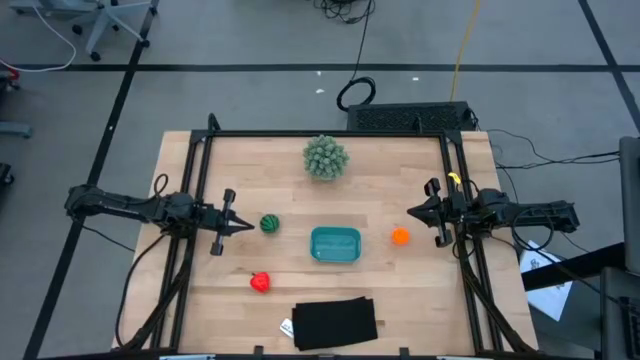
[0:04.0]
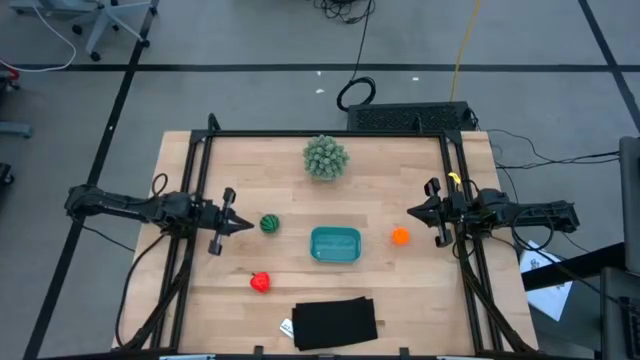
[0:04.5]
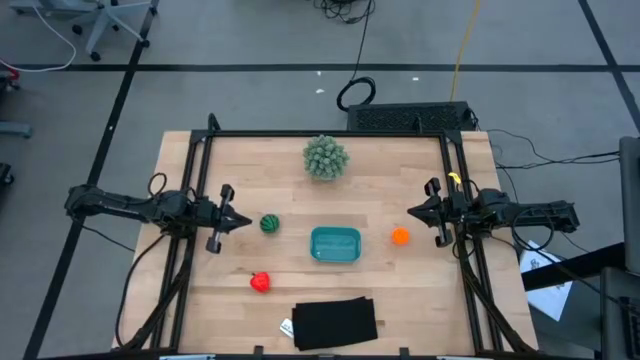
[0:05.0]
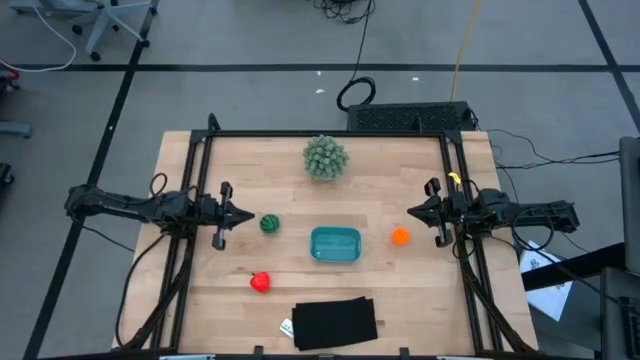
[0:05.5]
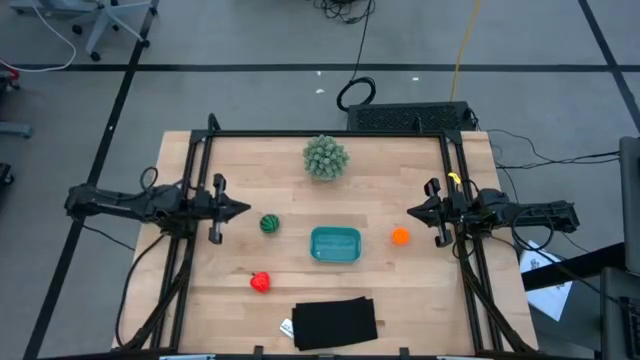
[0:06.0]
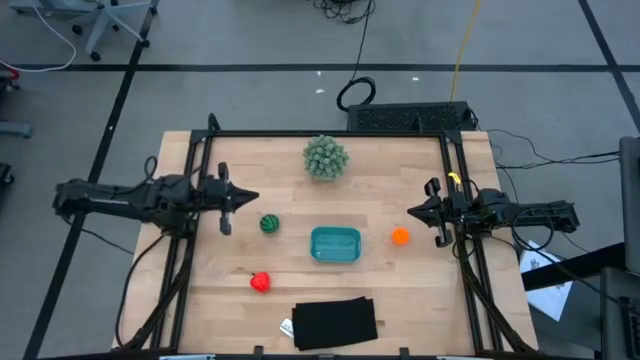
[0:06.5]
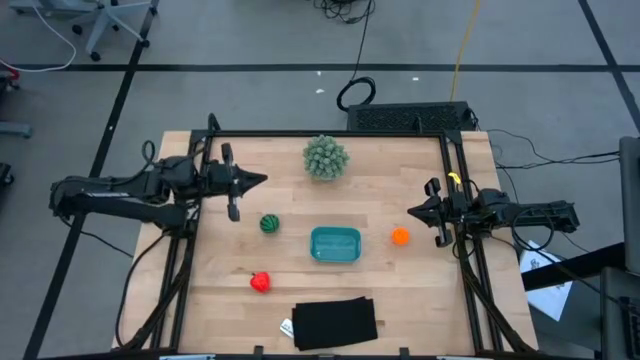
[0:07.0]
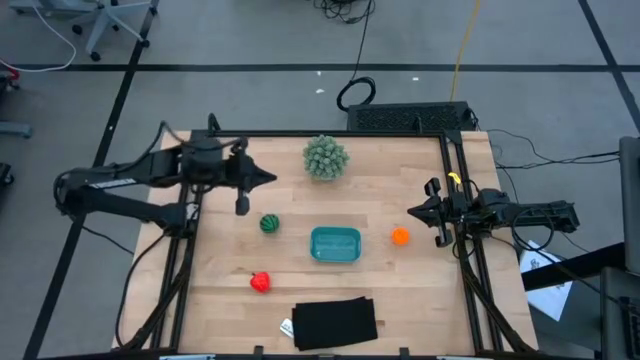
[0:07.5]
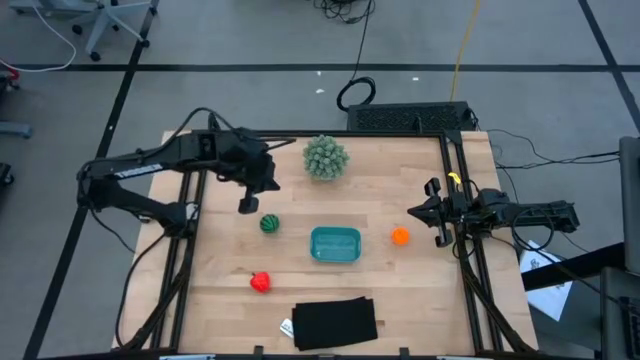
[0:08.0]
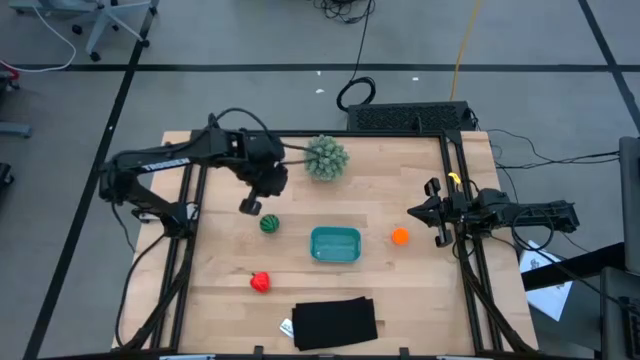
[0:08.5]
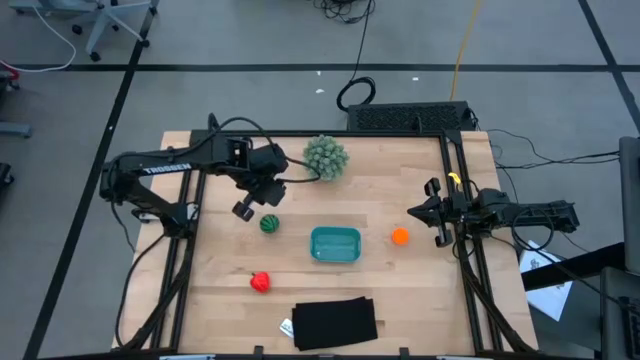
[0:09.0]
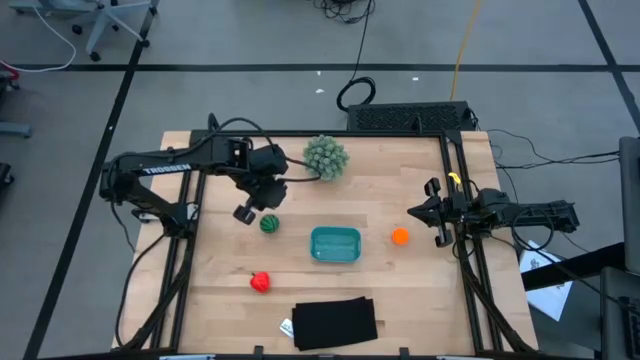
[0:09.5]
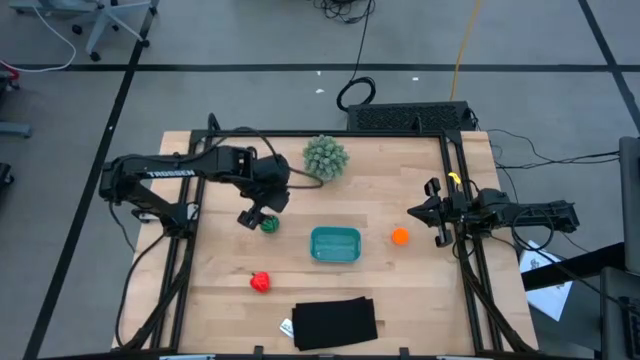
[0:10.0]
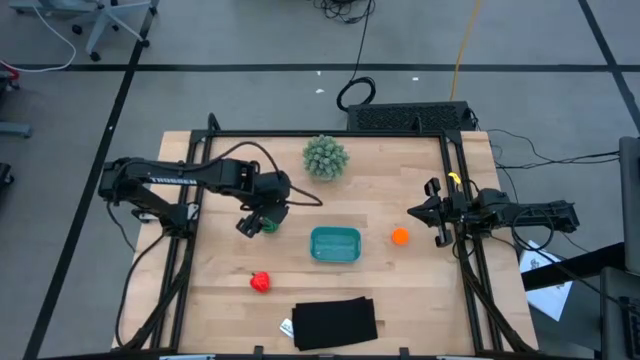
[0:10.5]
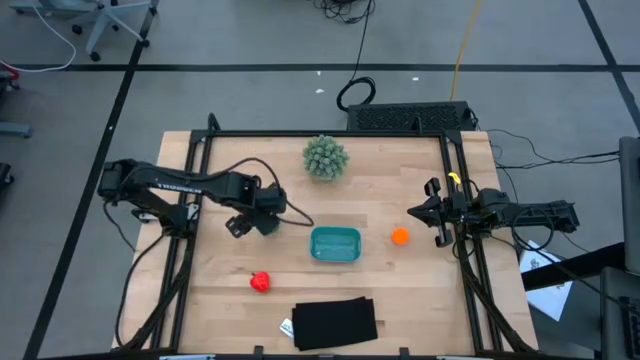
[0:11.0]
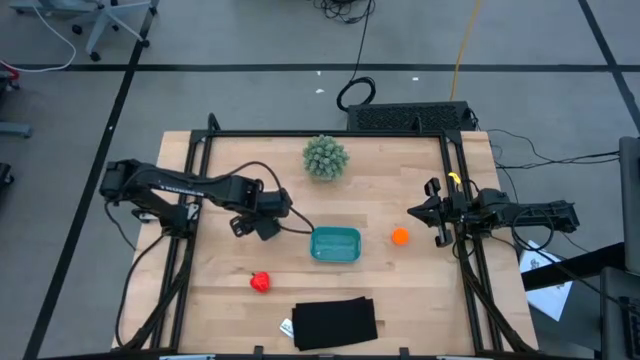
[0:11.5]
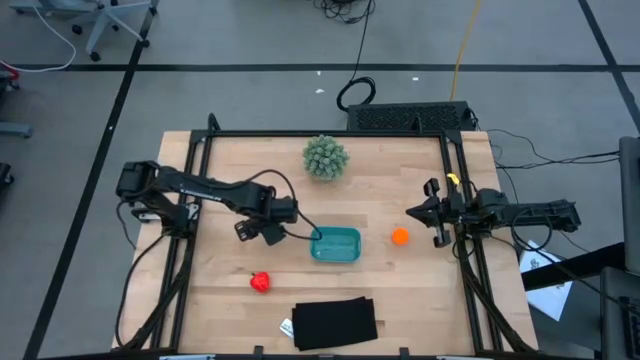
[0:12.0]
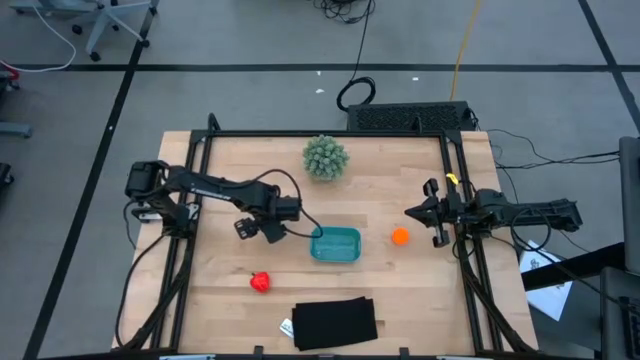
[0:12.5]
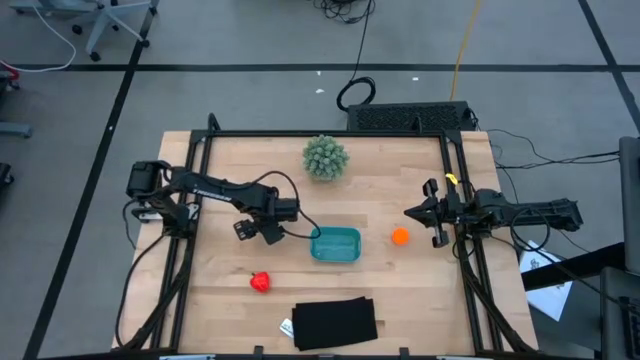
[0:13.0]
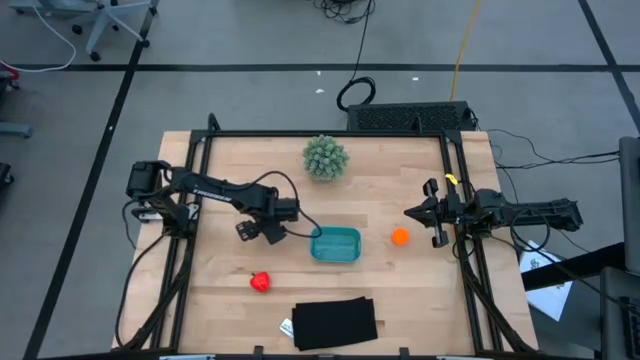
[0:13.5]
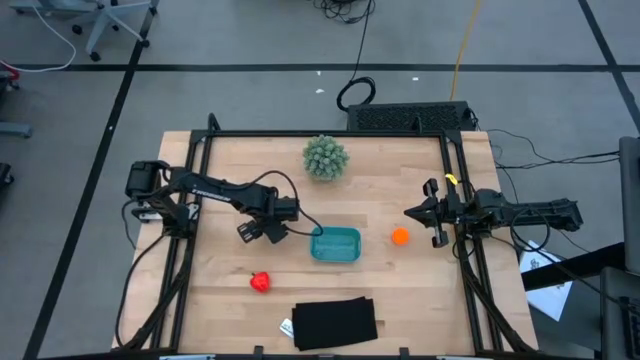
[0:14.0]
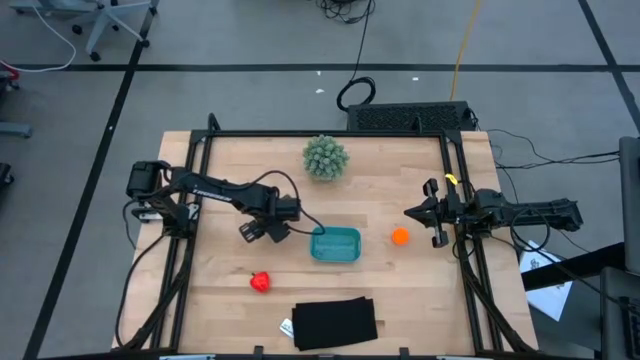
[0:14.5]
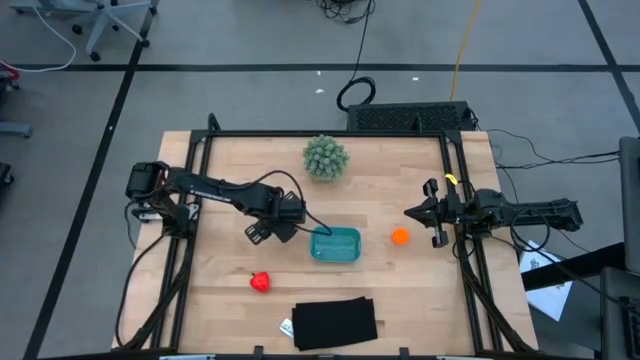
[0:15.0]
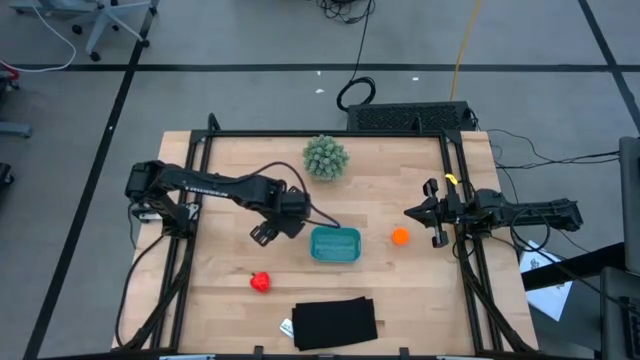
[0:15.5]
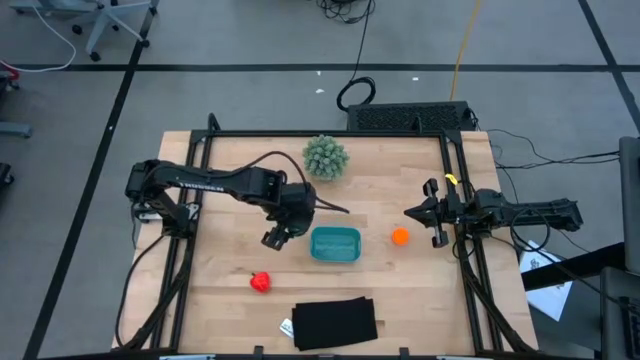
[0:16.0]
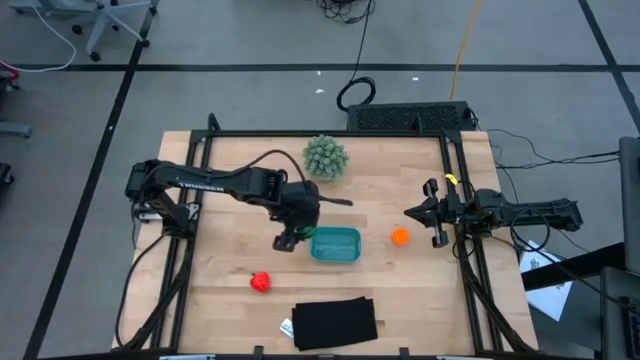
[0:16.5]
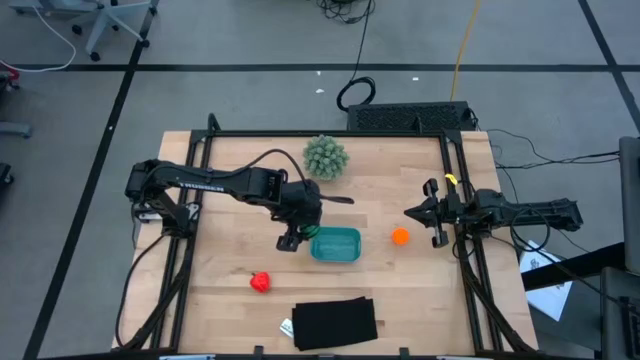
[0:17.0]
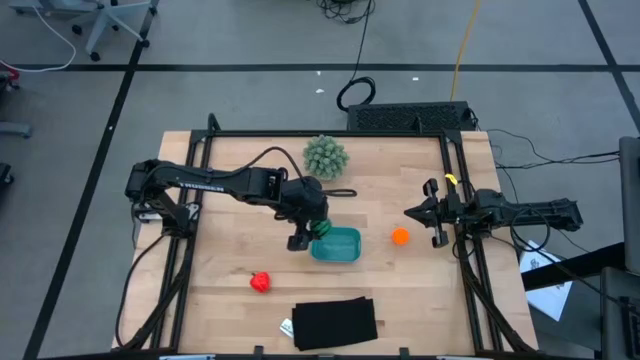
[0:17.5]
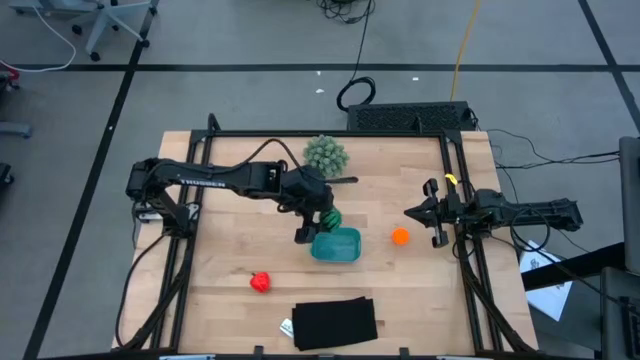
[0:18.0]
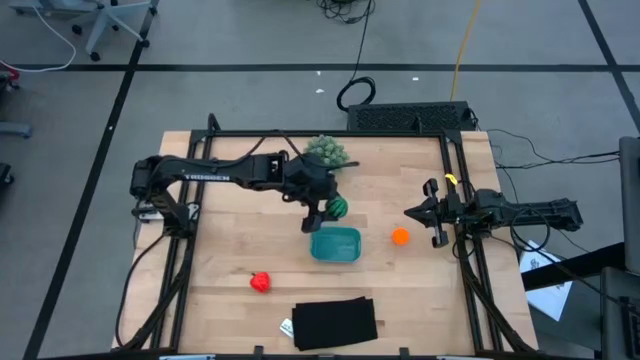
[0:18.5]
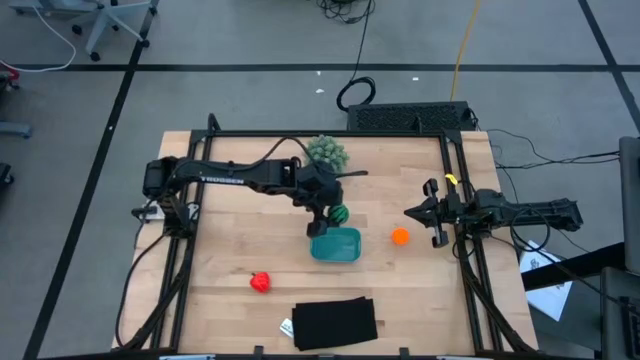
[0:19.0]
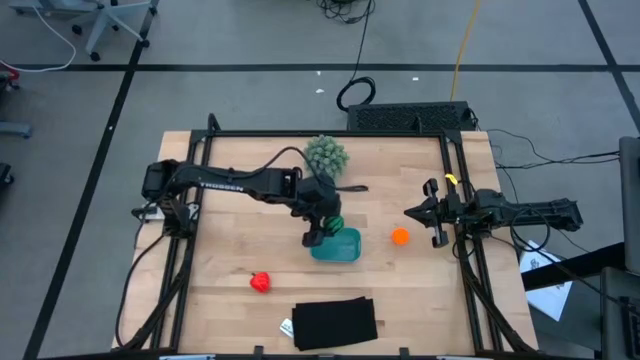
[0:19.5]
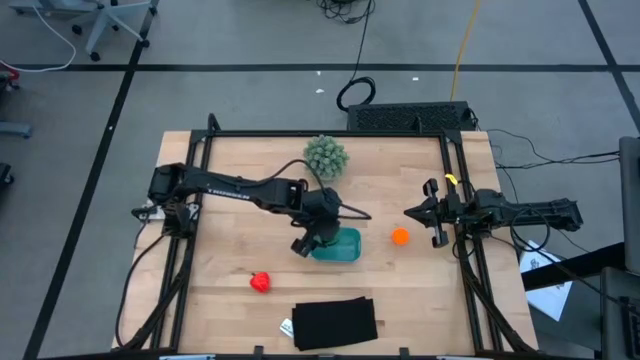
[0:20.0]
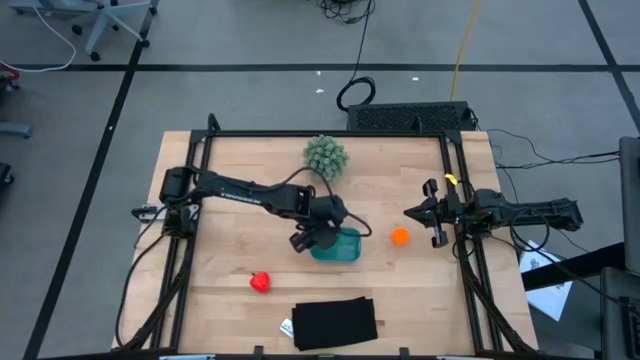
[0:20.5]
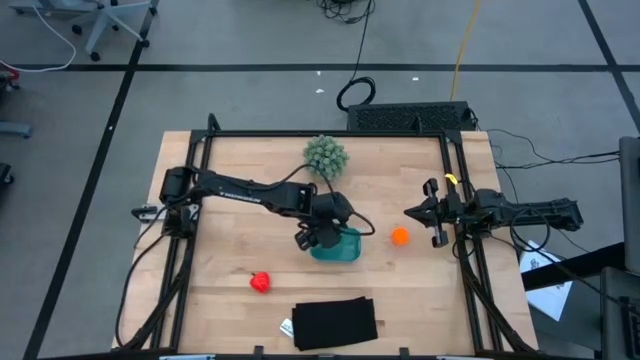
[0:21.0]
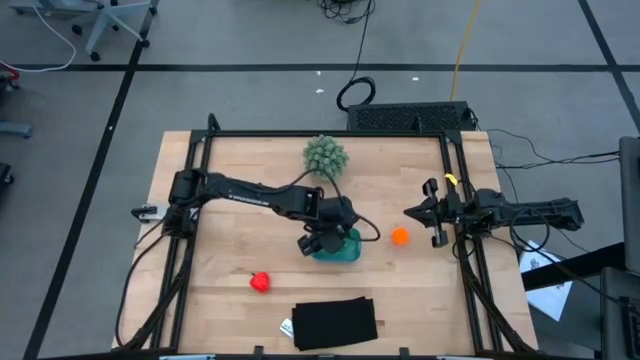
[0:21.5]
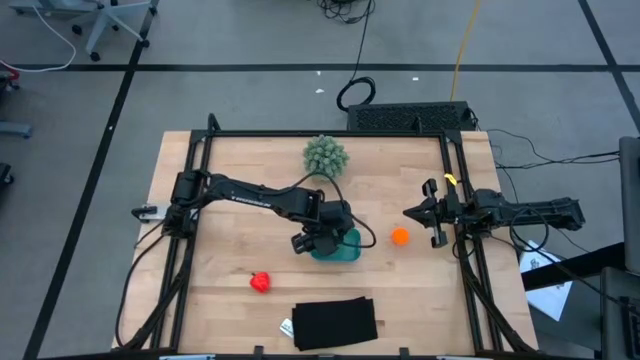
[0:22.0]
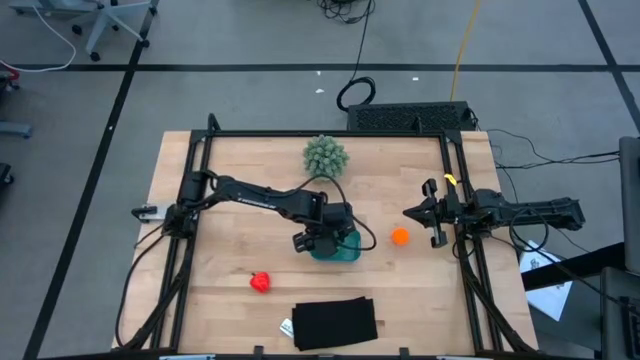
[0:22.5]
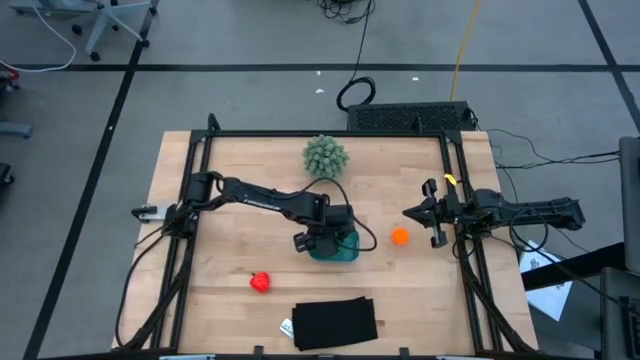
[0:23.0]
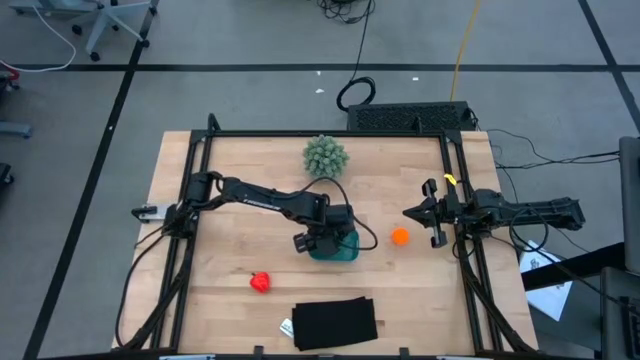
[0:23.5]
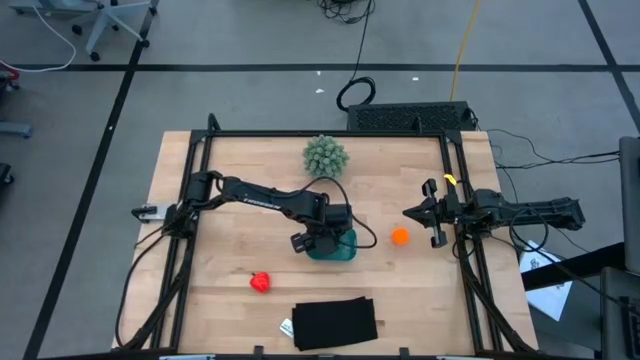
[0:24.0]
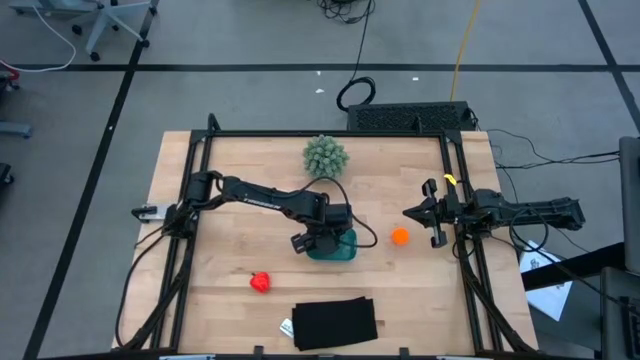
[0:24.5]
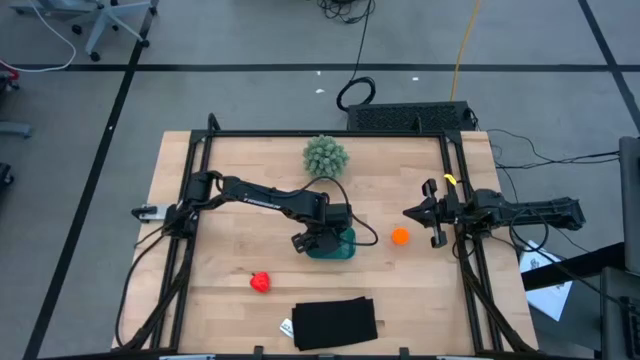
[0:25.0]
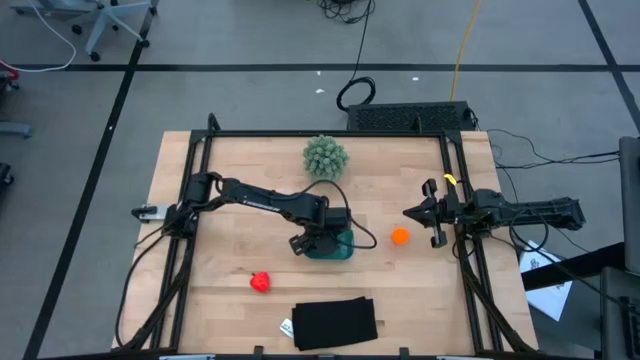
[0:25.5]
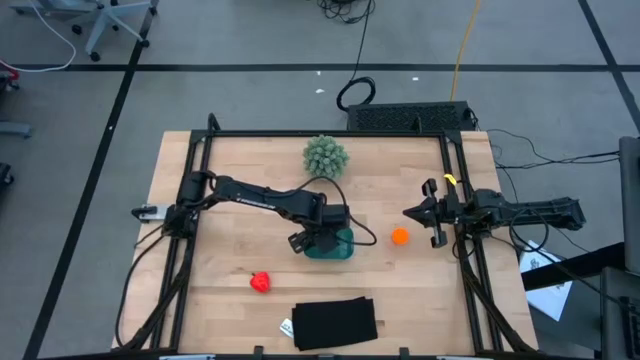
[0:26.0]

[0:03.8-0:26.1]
Task: Pick and placing Produce into tupperware
Put the watermelon toy into the bin
